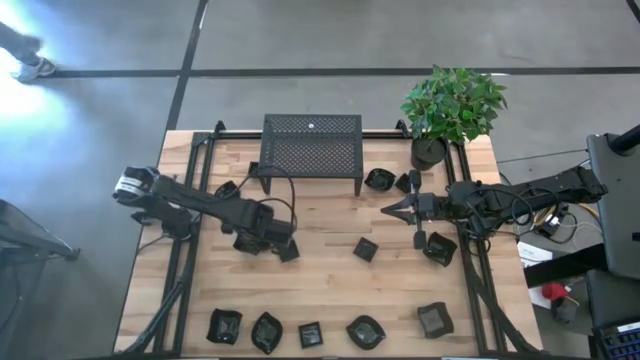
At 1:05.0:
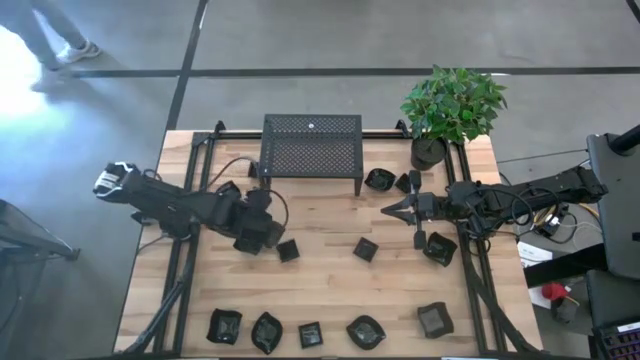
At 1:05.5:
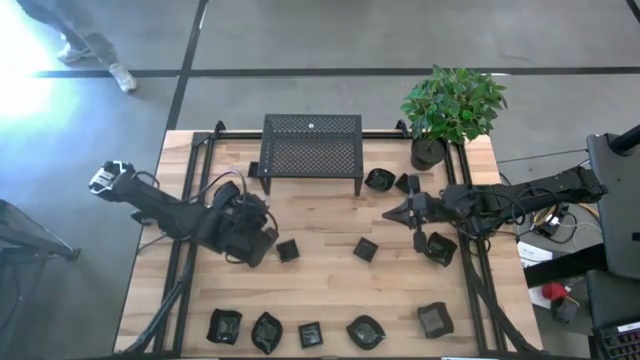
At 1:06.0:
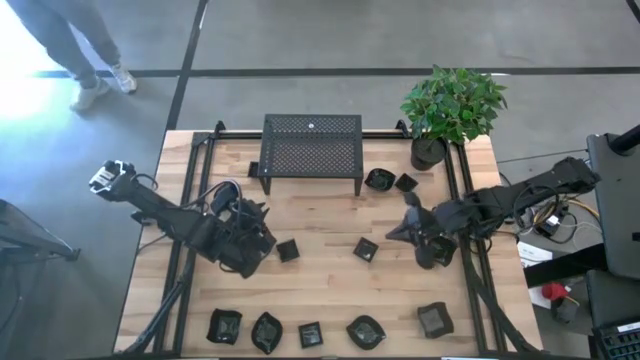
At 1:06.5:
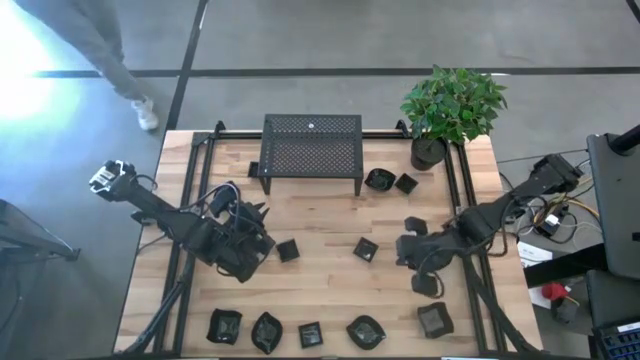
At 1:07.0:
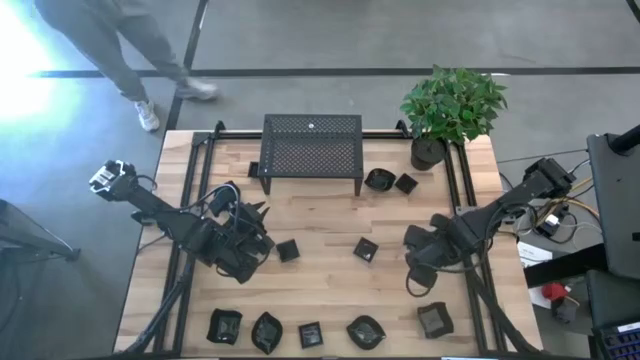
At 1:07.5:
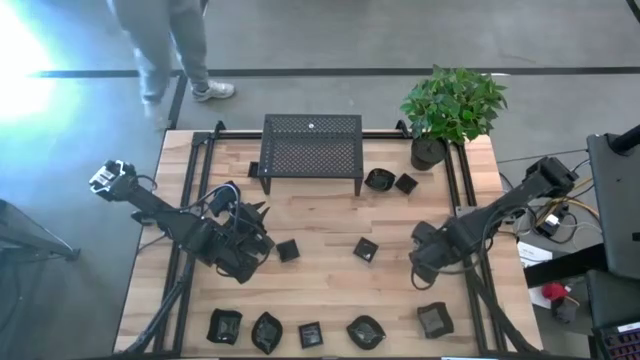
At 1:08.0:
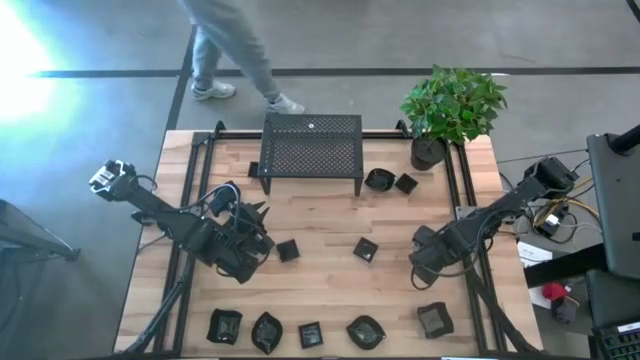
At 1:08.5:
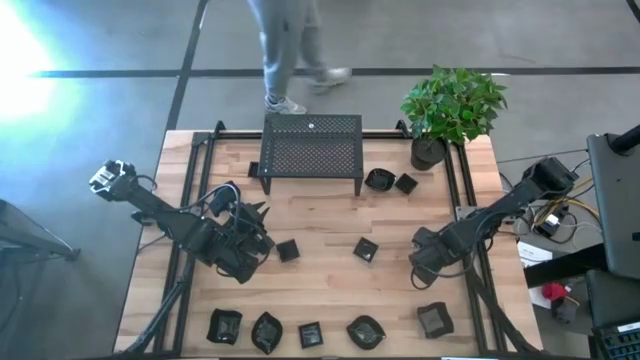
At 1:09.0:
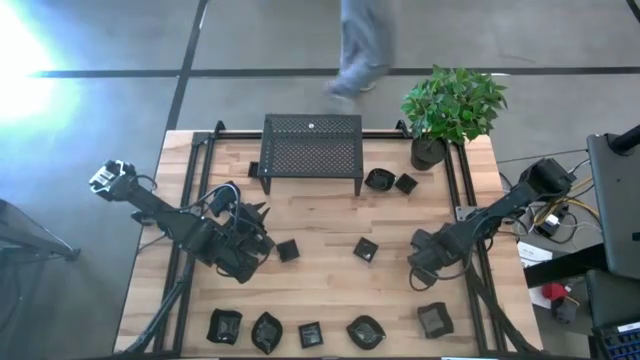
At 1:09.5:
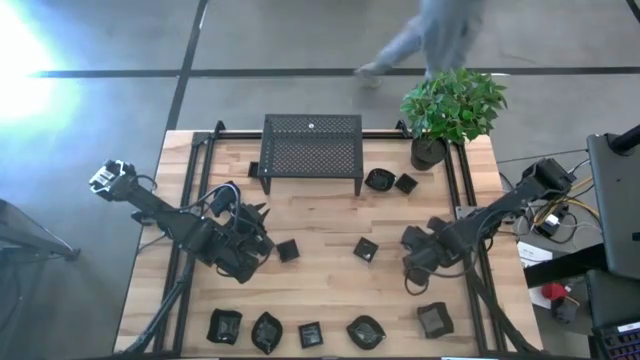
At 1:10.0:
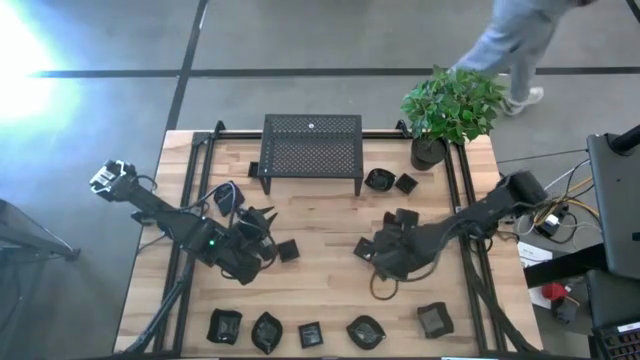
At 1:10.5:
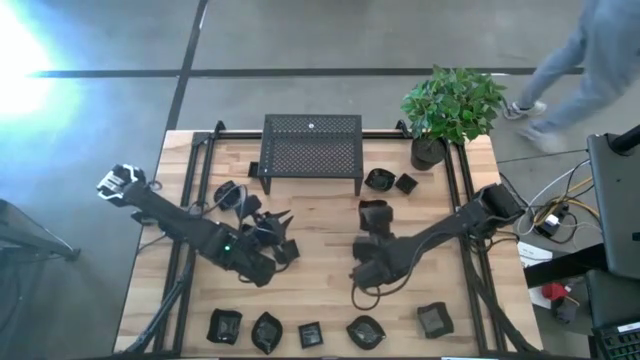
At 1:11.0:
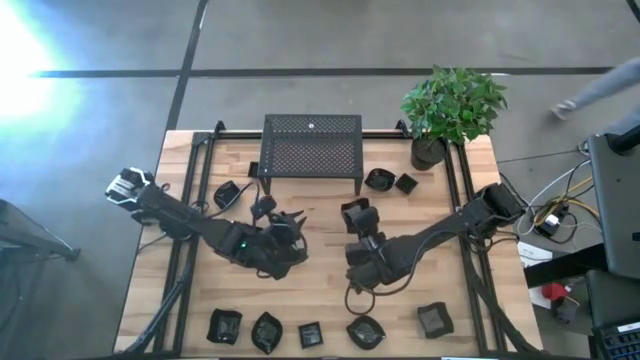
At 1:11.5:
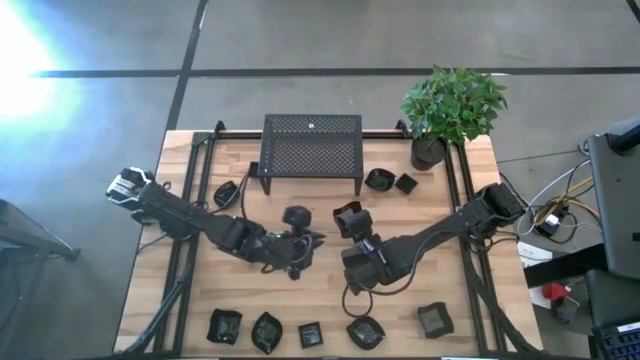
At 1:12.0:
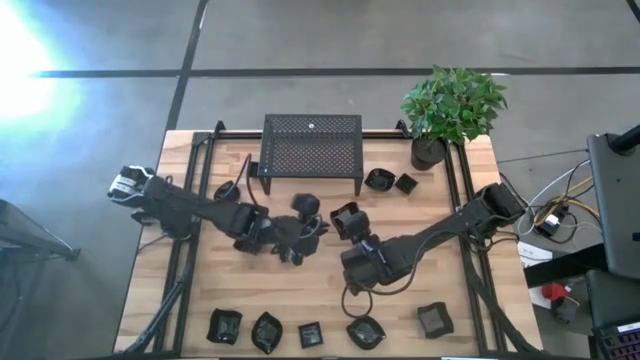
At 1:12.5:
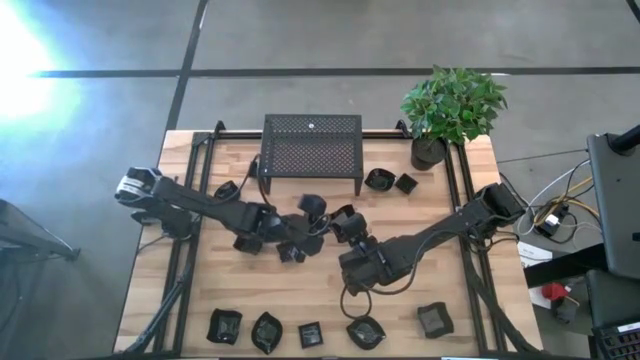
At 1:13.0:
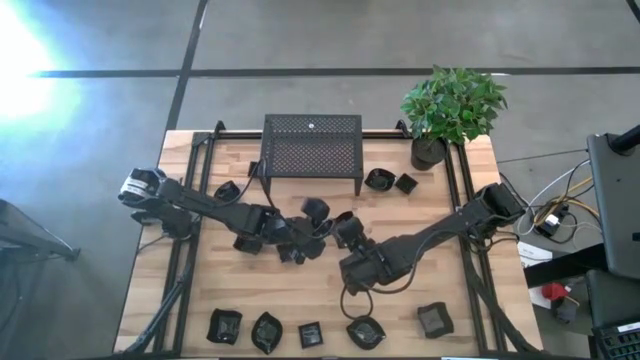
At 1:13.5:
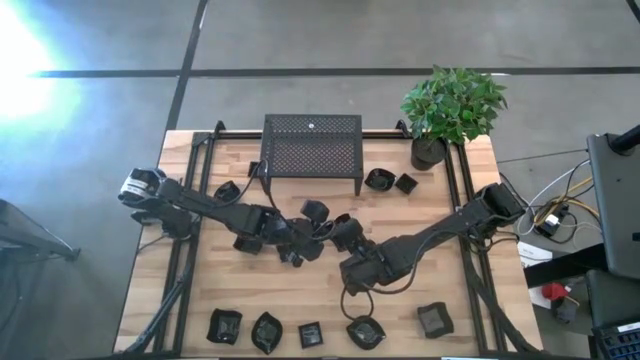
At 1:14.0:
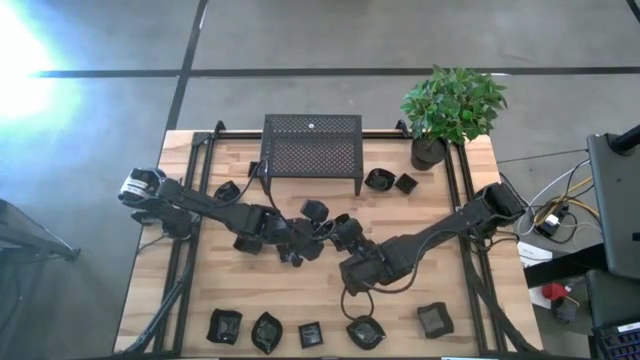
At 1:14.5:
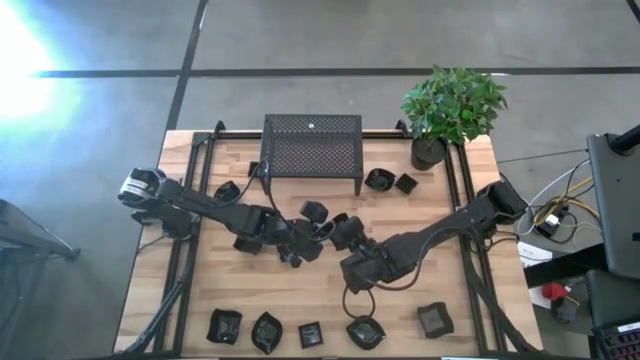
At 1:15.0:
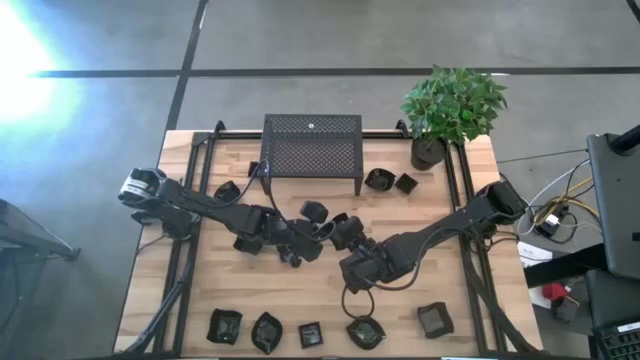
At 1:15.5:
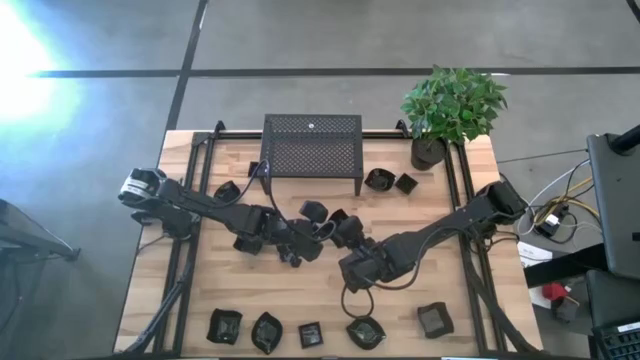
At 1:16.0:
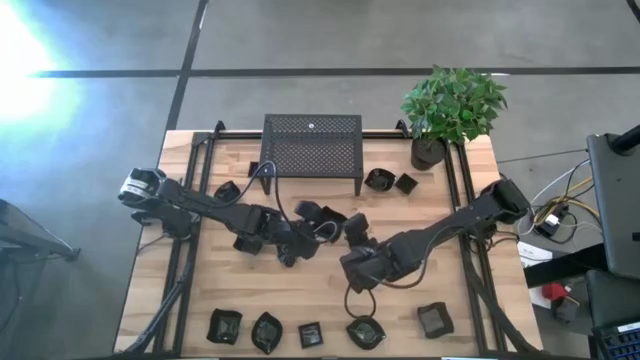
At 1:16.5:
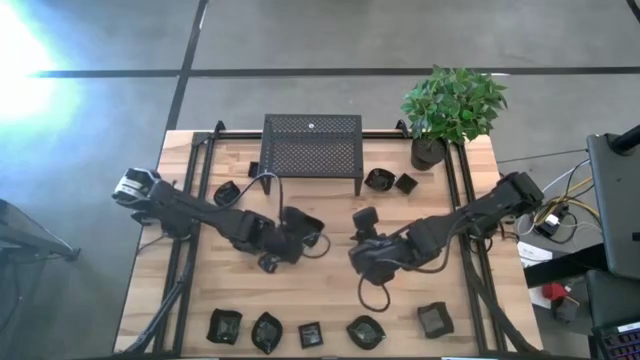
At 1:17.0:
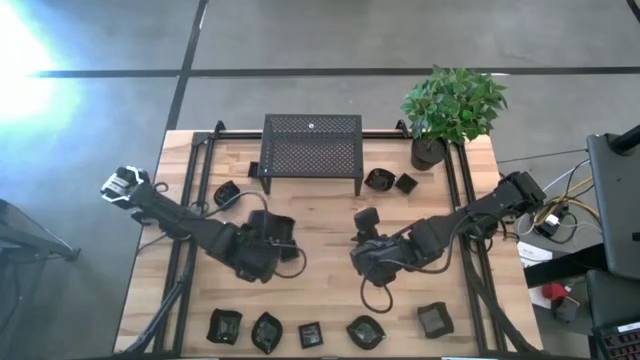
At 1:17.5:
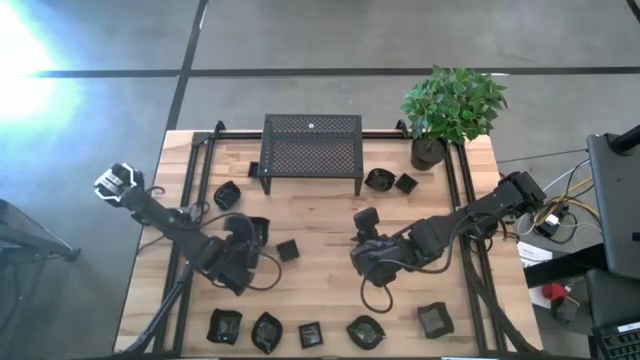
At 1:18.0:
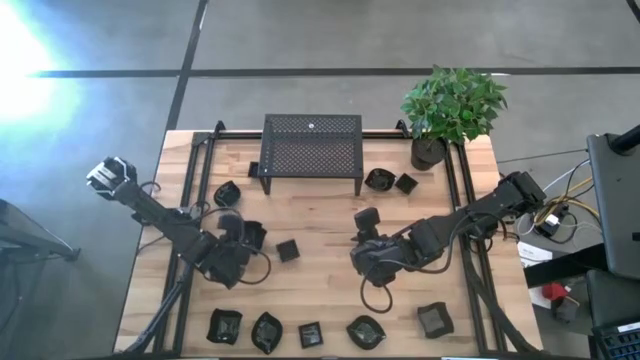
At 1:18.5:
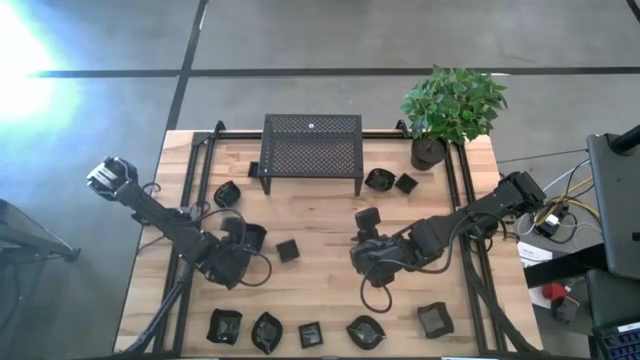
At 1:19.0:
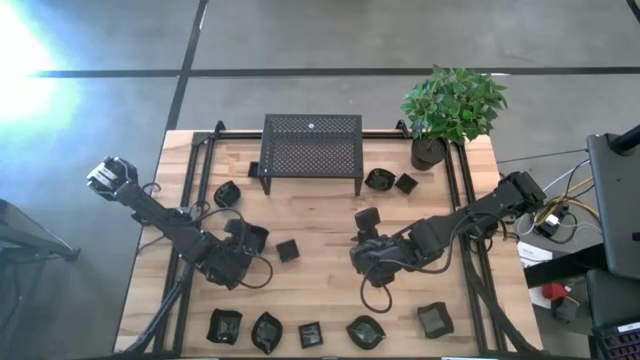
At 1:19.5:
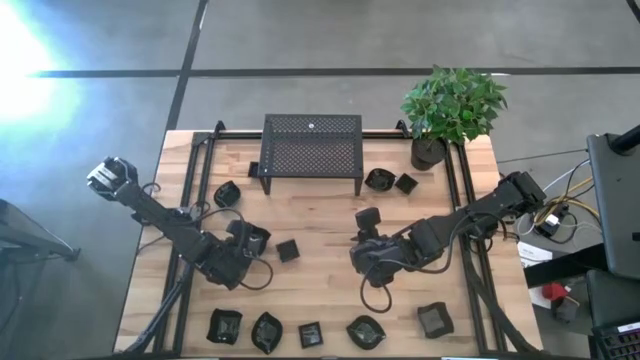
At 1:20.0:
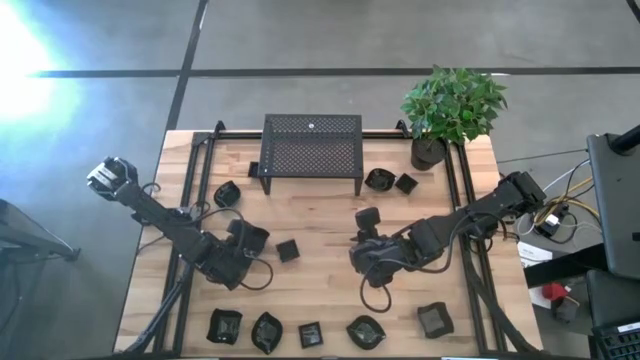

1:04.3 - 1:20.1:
Task: Pick & Place Mini shaped plates
Stack the black distorted square plate on top of the other black distorted square plate

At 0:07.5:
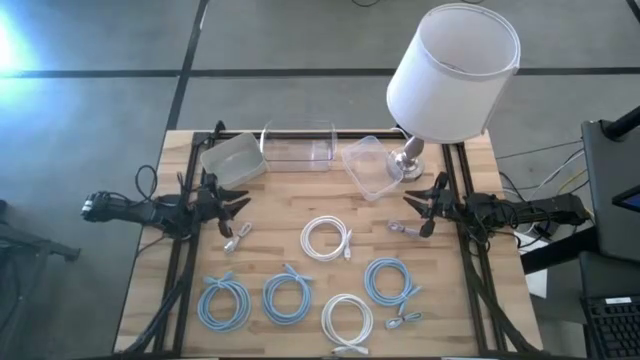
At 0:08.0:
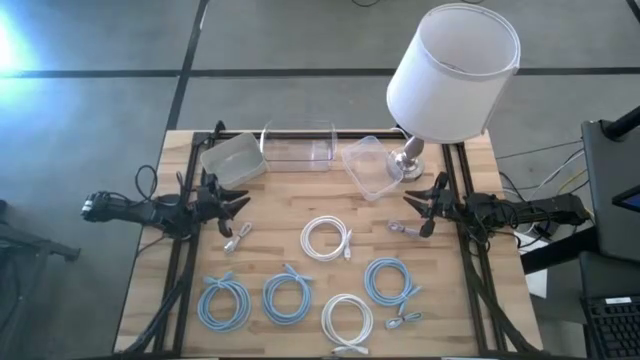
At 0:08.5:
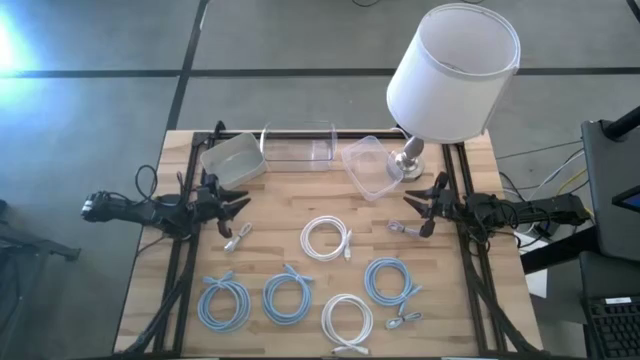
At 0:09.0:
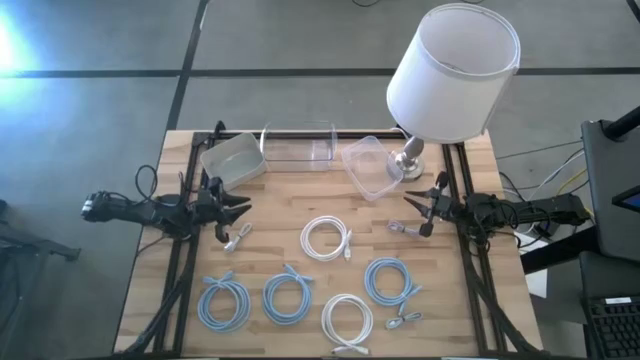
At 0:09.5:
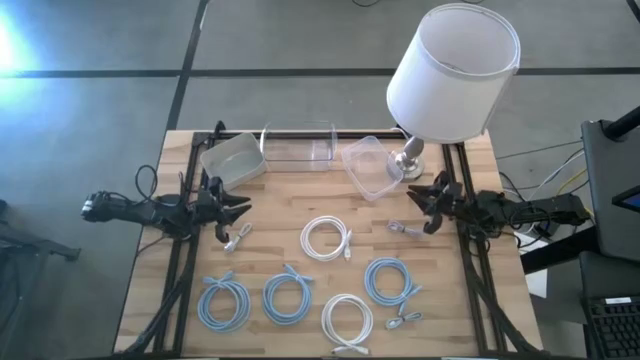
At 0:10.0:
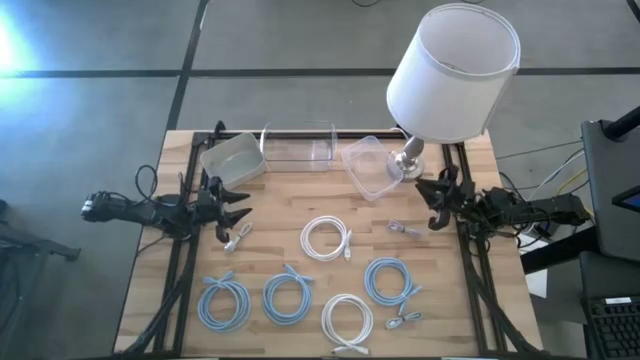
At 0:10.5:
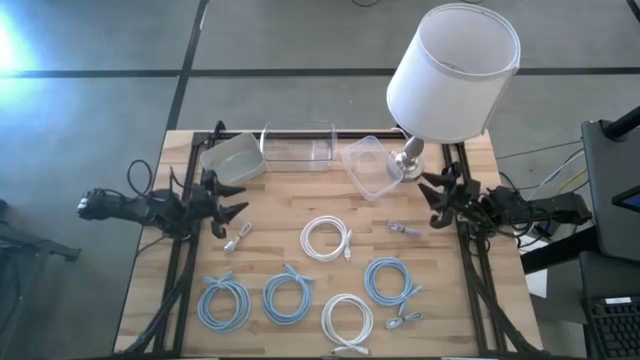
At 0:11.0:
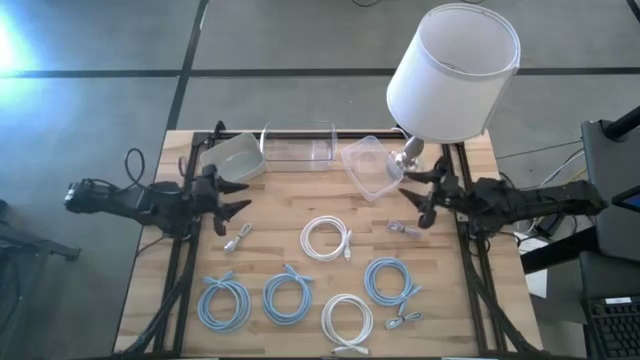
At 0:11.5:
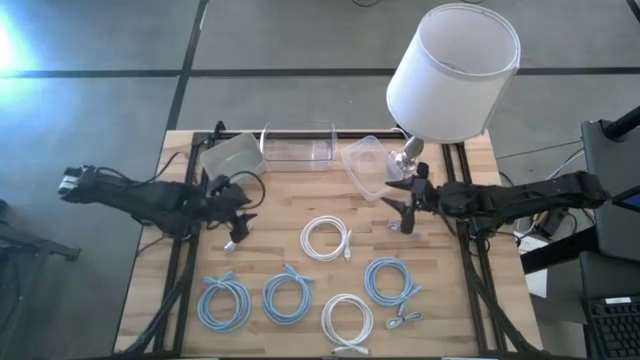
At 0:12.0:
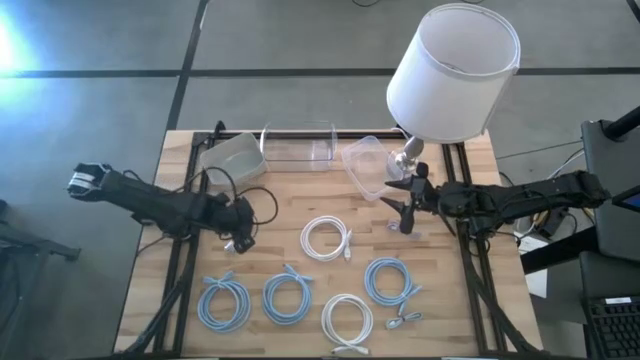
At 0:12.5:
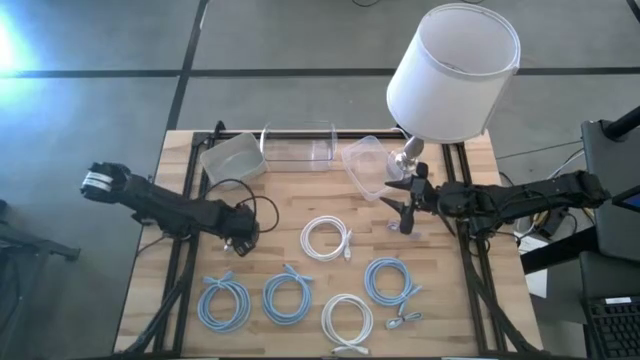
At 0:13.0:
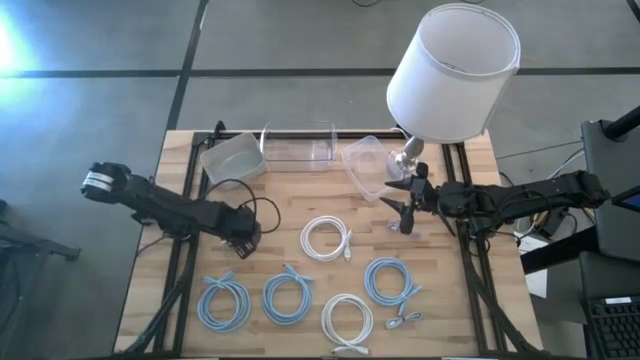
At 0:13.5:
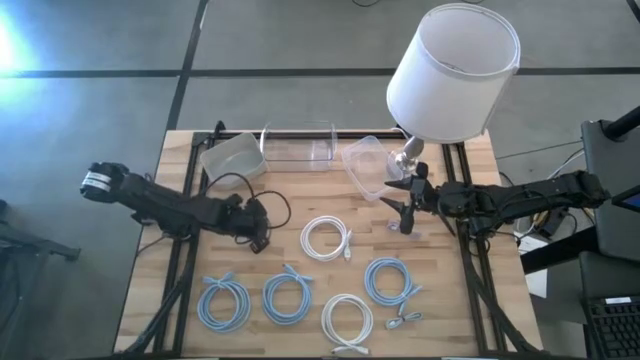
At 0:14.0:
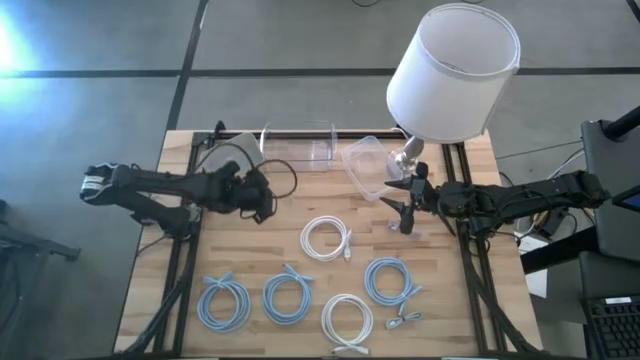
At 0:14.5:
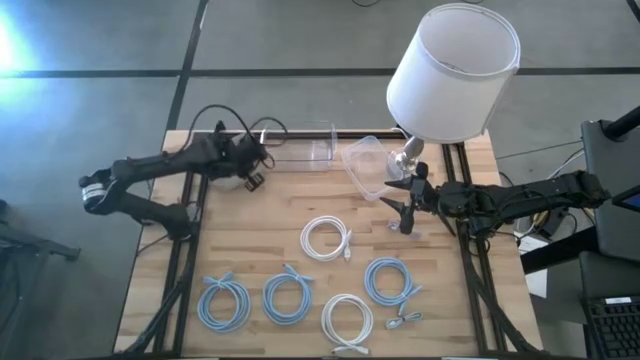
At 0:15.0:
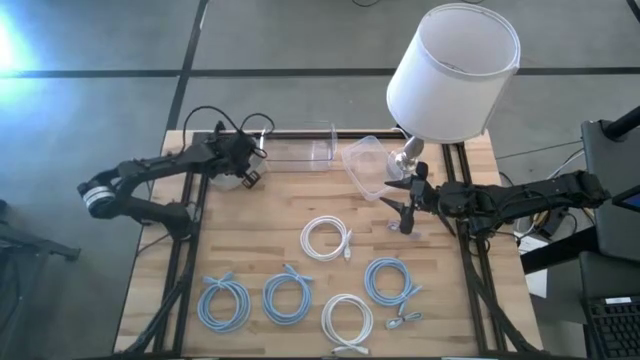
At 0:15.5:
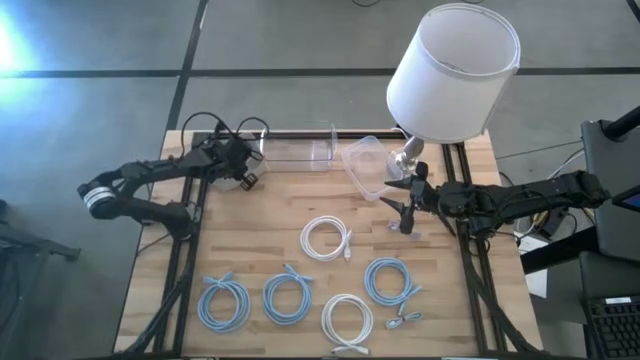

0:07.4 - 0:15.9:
Task: Pick & Place USB Port
Put the white charger cable into the gray bin
